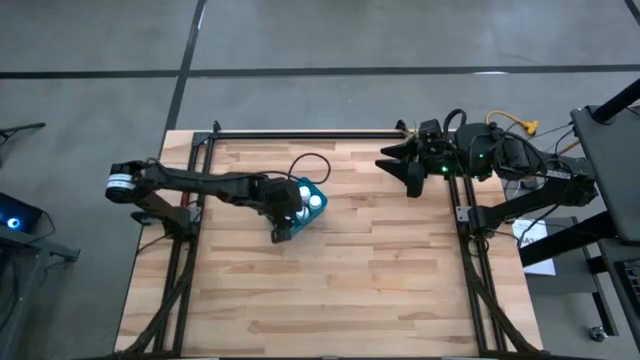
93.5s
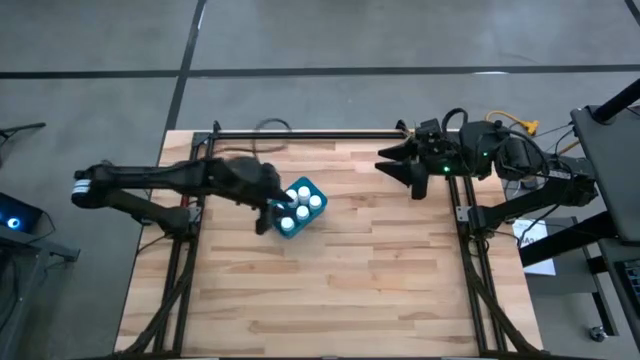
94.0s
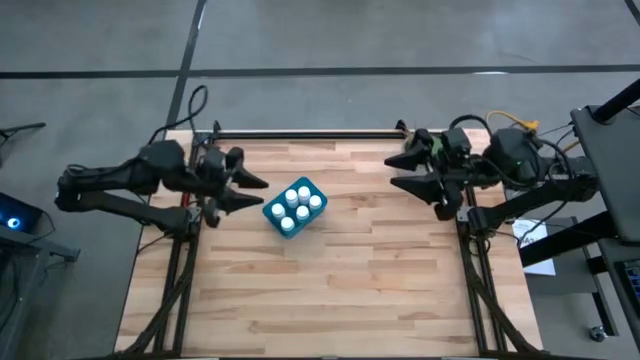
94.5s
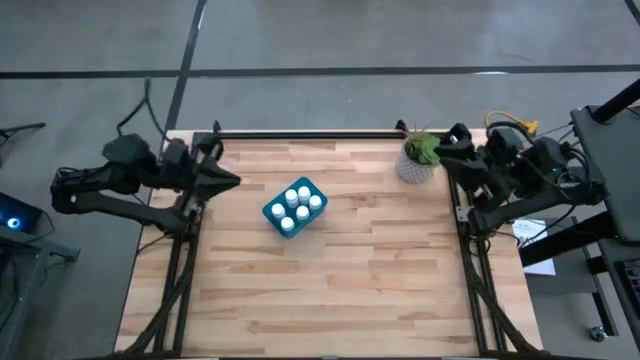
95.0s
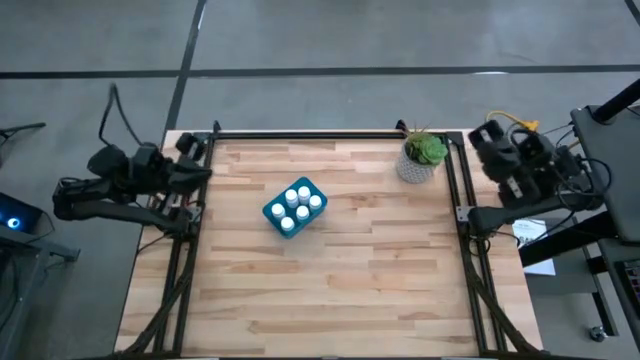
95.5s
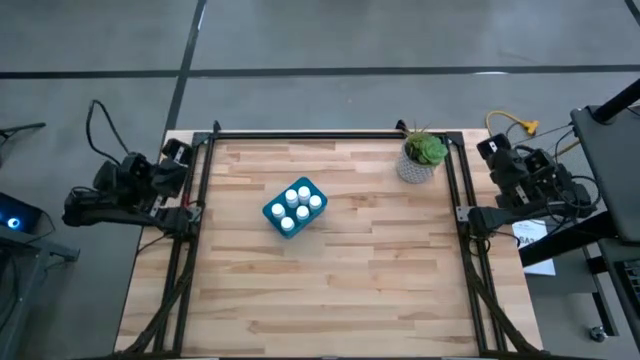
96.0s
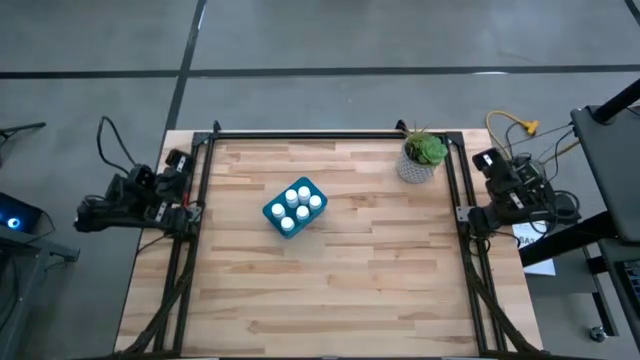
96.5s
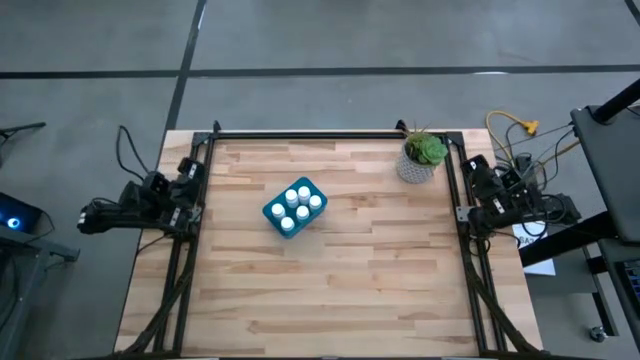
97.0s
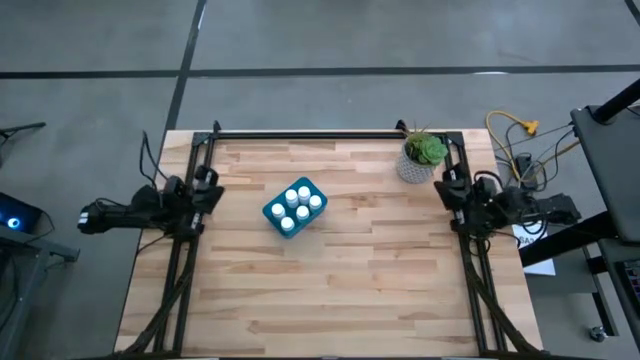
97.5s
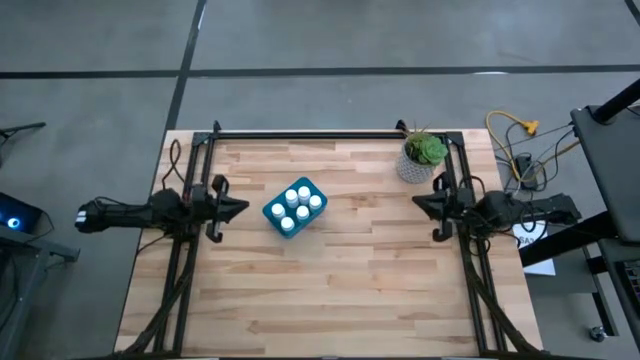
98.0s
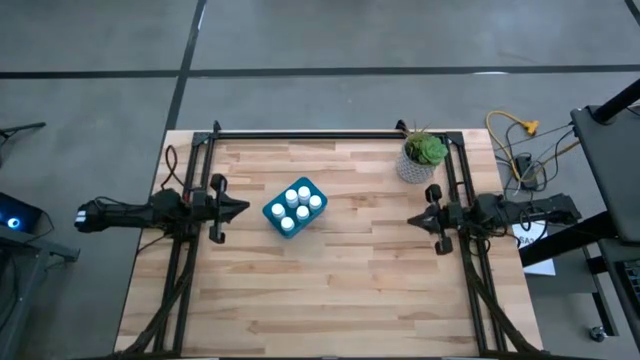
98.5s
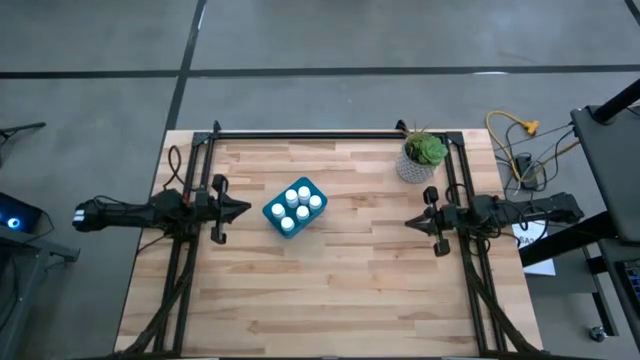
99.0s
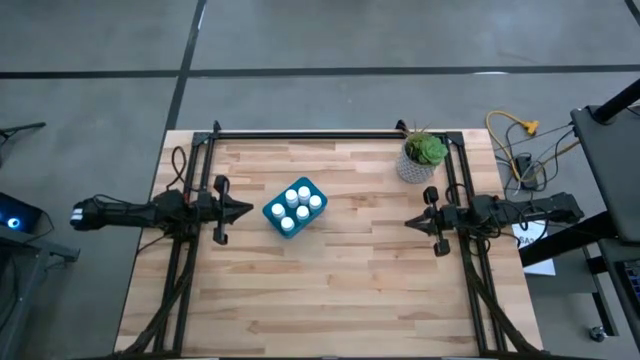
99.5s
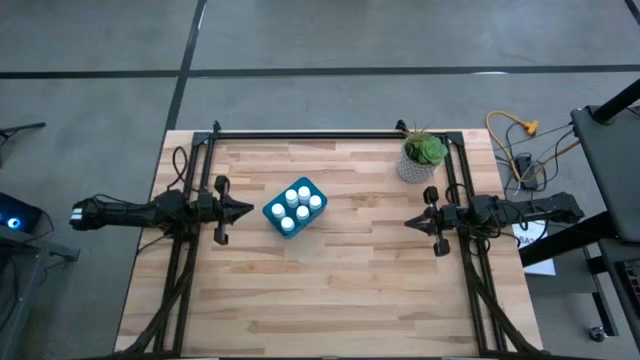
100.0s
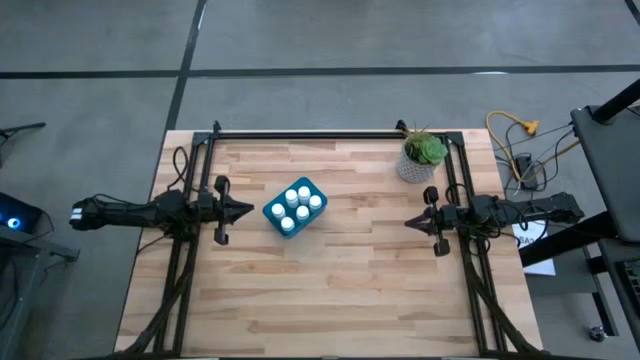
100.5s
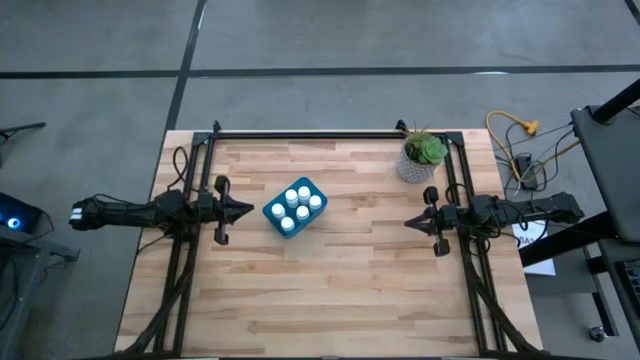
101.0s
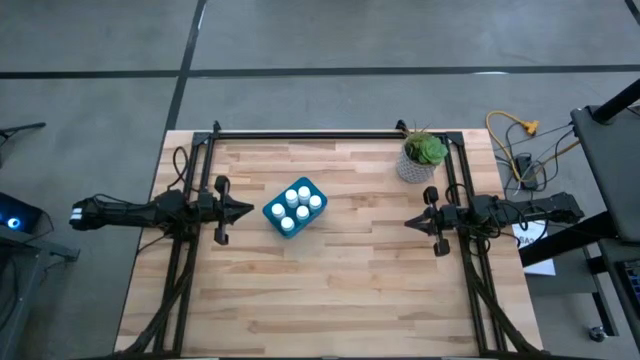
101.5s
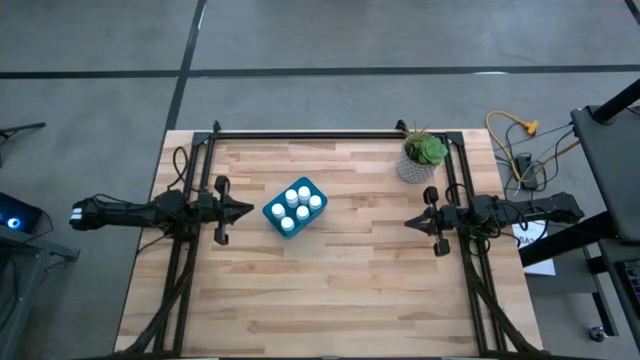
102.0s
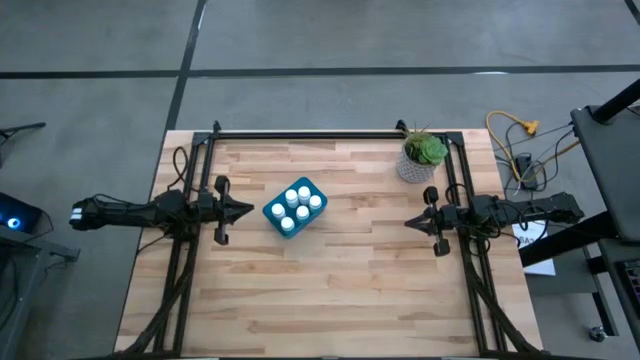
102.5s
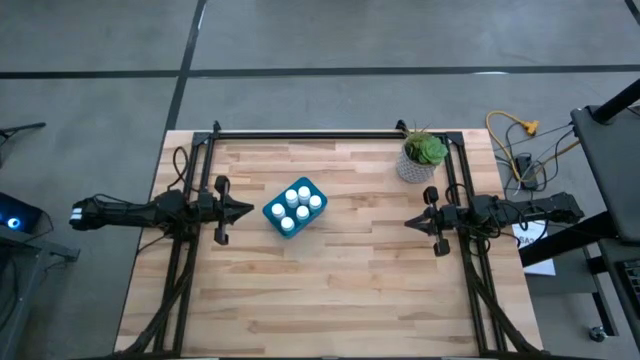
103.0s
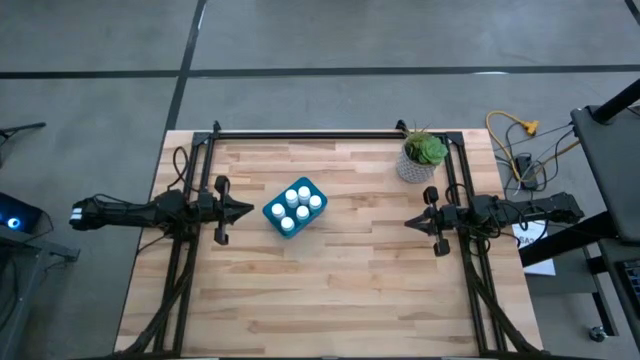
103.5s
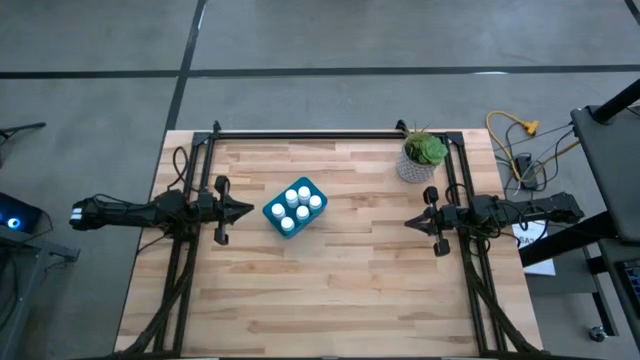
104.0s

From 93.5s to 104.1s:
Task: Pick and place pill bottles into a basket
Return to Home Position

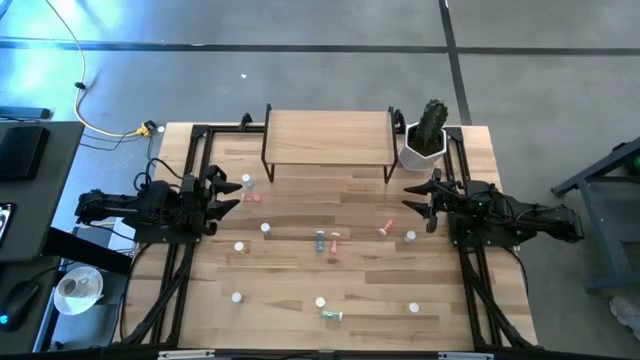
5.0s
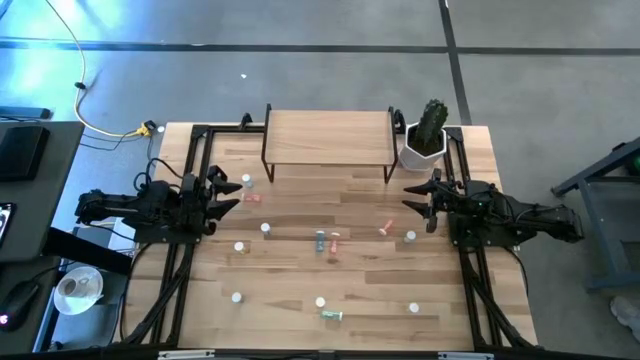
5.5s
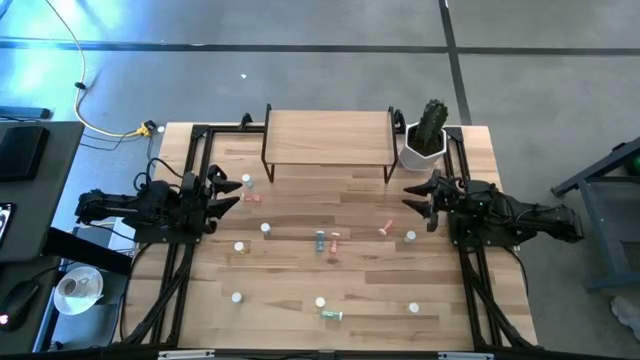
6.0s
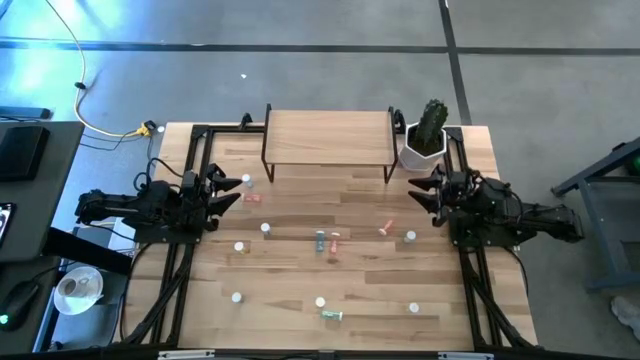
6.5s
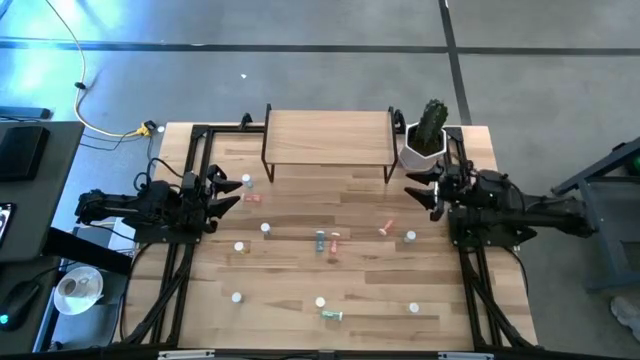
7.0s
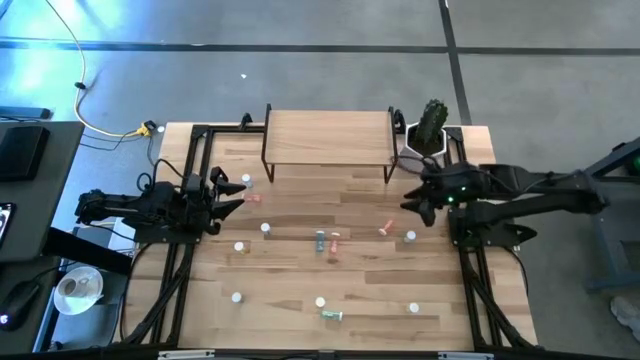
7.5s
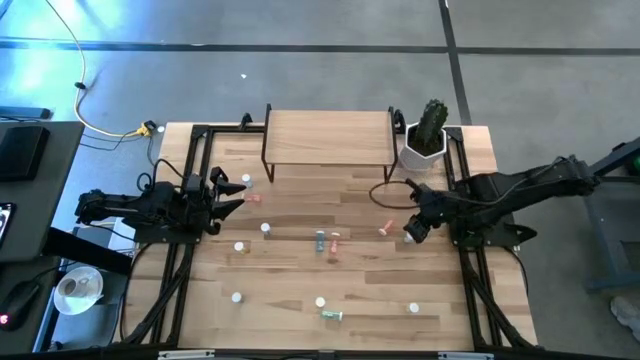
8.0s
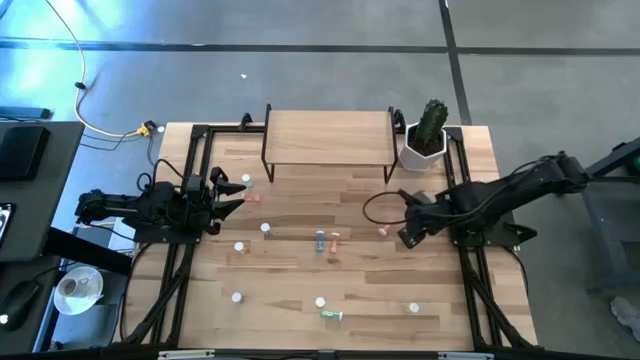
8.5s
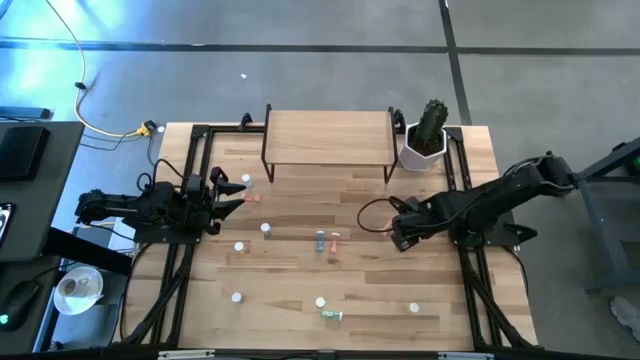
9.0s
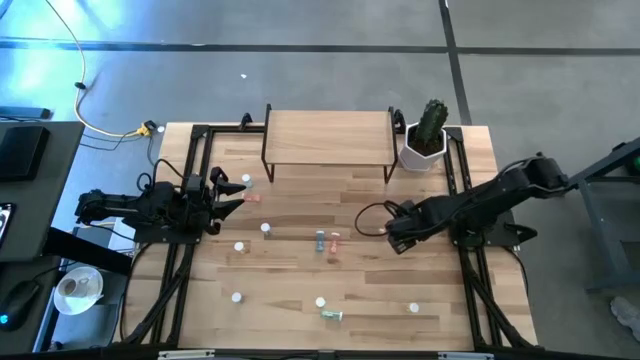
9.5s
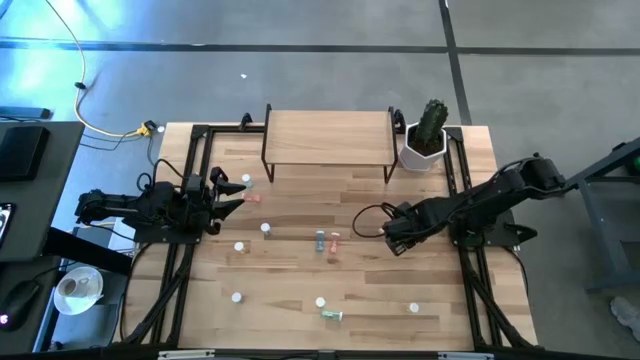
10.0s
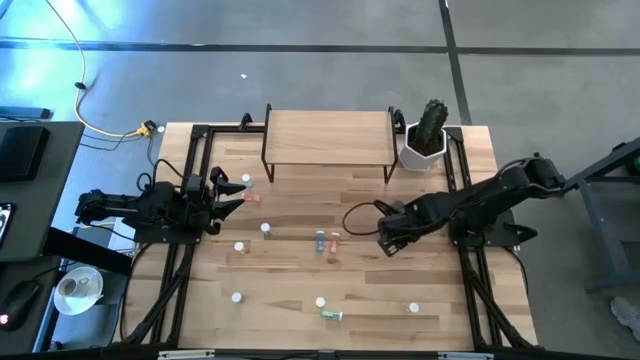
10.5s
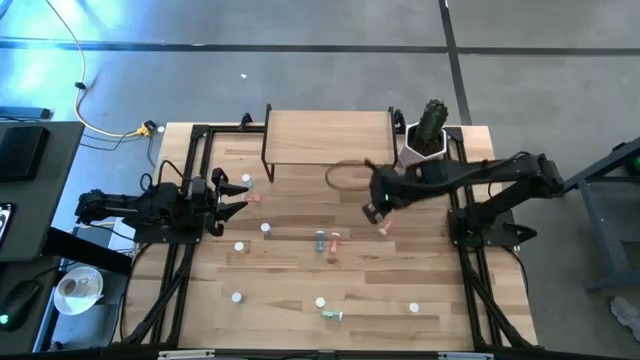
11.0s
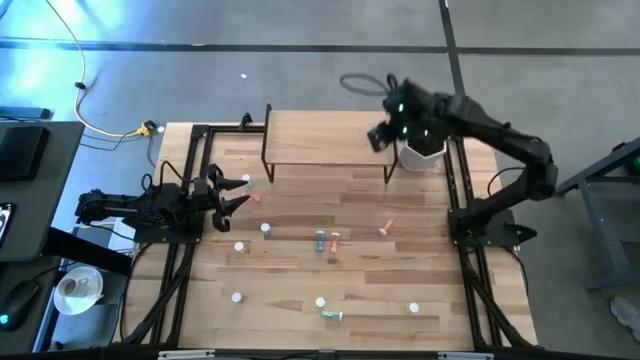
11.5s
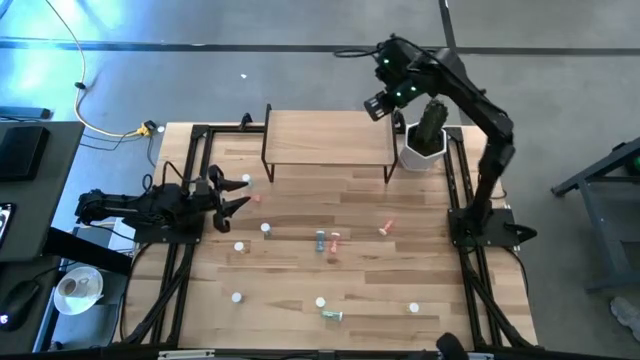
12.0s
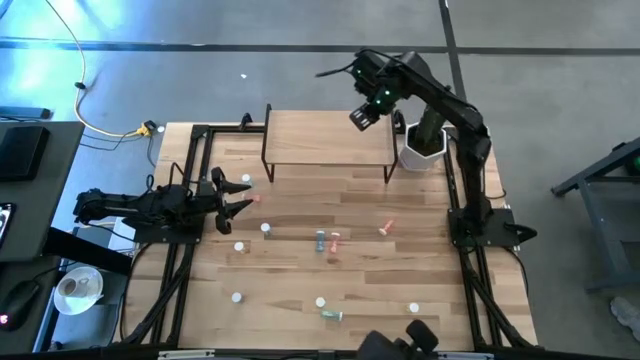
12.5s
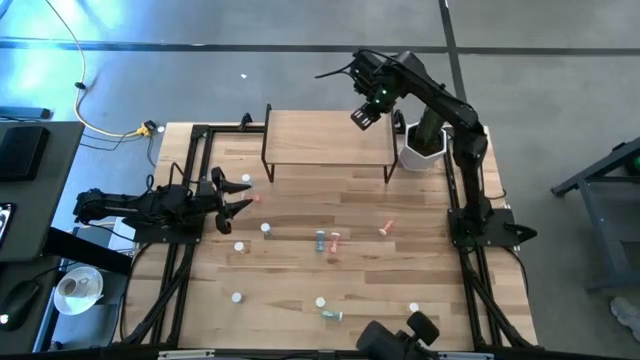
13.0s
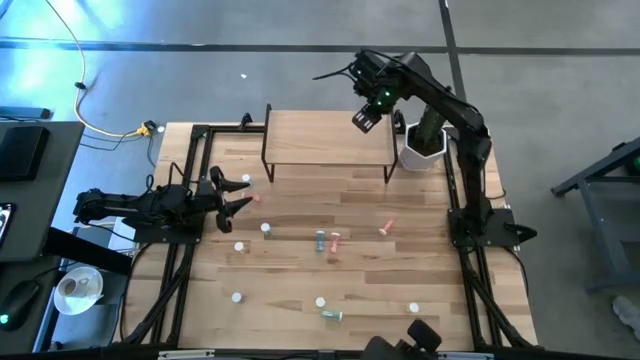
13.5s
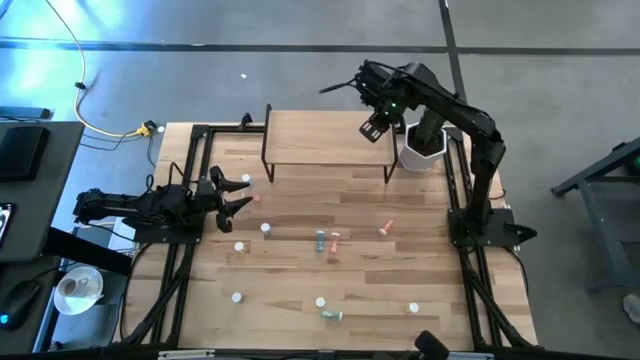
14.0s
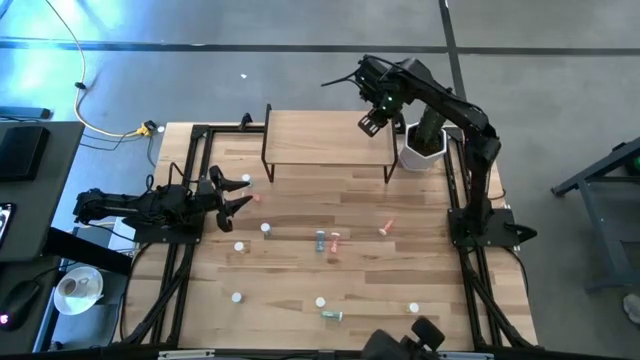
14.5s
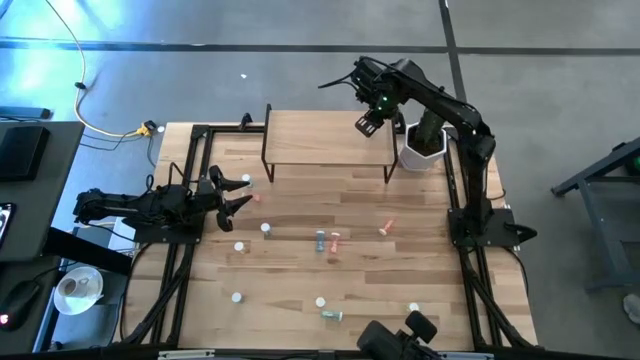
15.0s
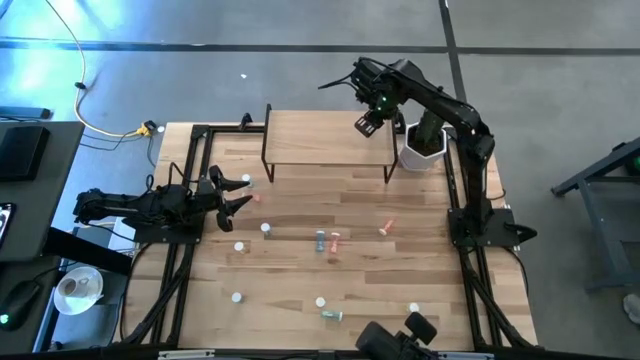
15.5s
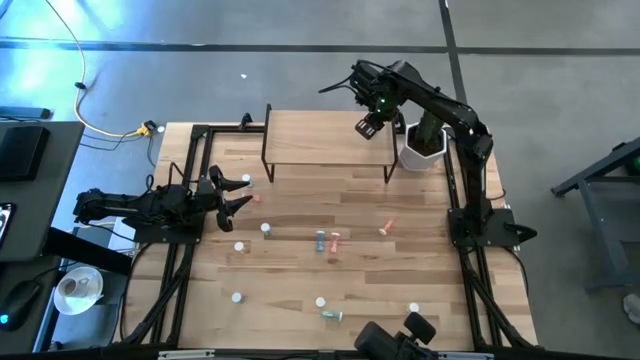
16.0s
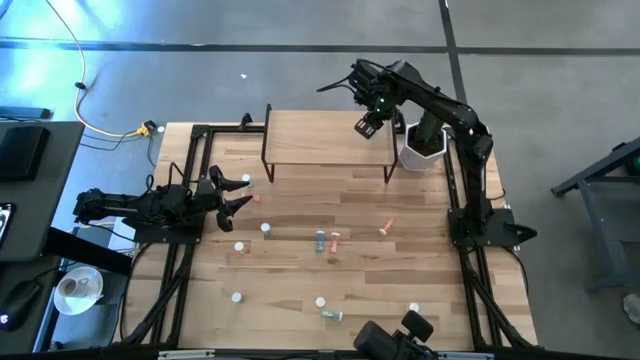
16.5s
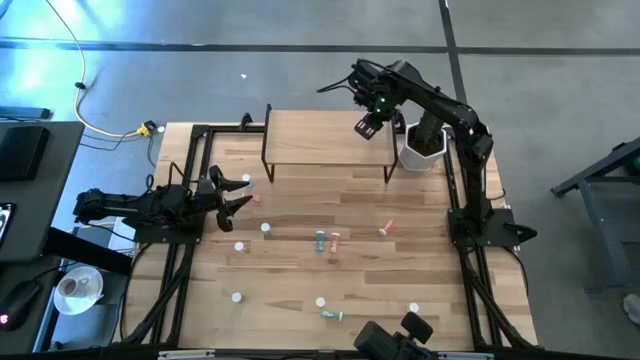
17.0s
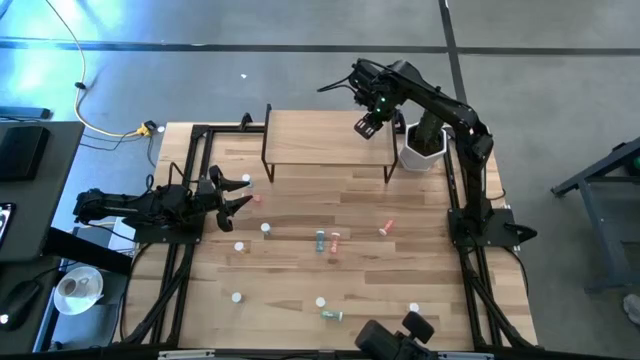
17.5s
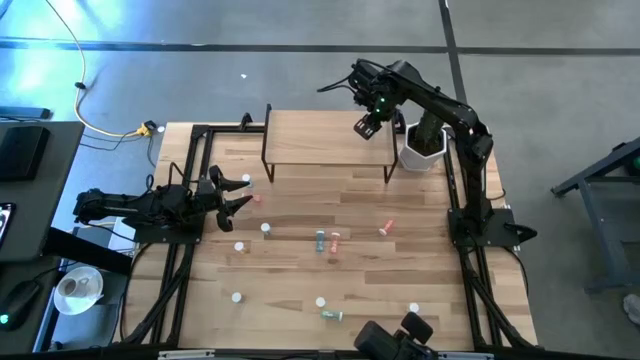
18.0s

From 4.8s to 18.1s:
Task: Pick and place medicine bottles onto shelf by color
Put the top right green pill bottle on the shelf
